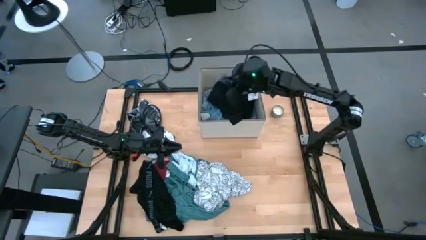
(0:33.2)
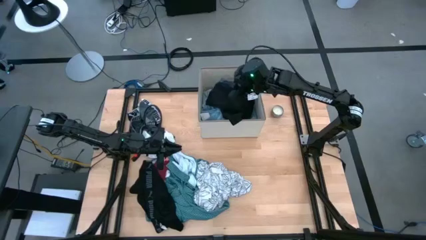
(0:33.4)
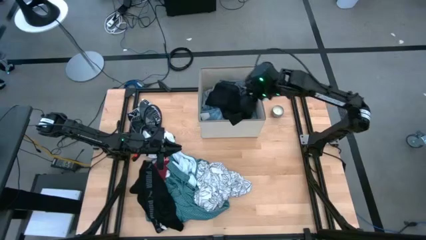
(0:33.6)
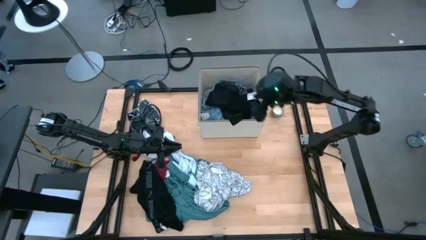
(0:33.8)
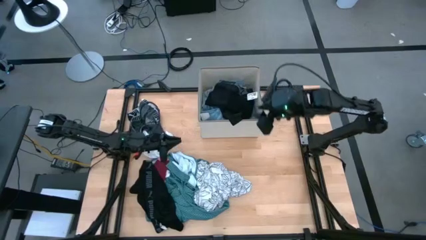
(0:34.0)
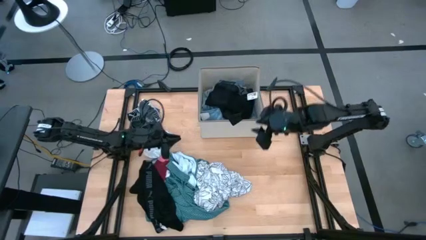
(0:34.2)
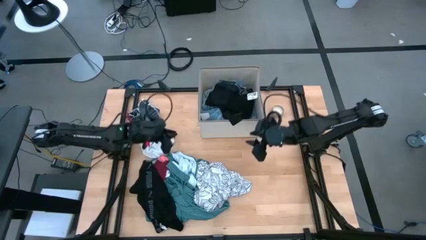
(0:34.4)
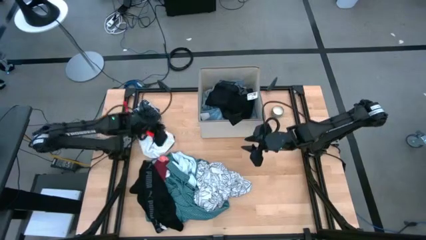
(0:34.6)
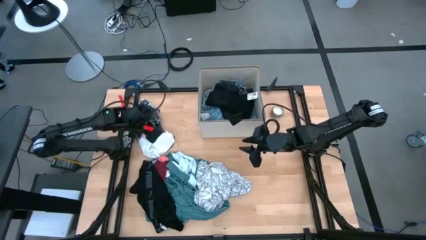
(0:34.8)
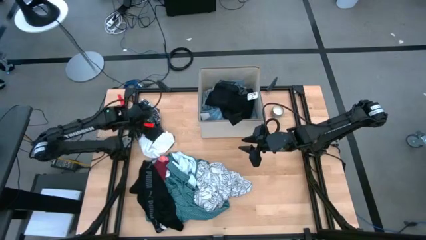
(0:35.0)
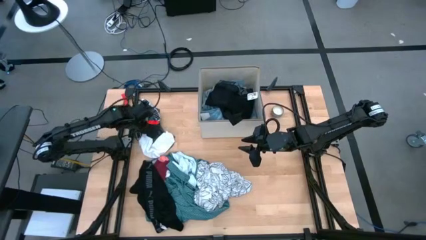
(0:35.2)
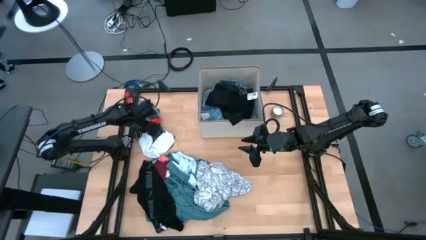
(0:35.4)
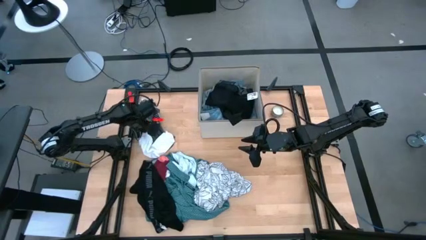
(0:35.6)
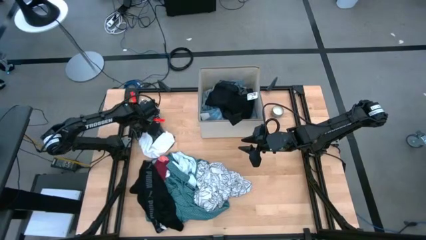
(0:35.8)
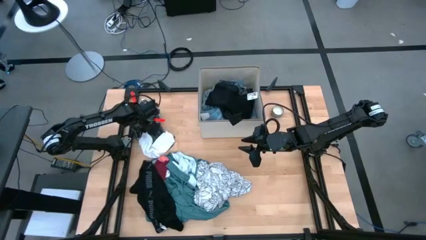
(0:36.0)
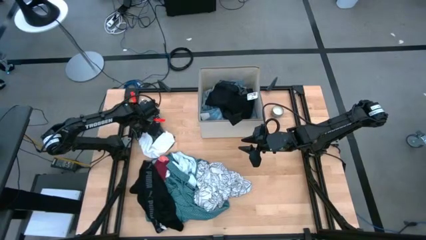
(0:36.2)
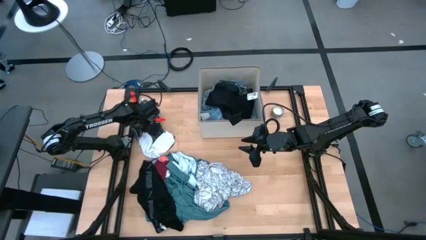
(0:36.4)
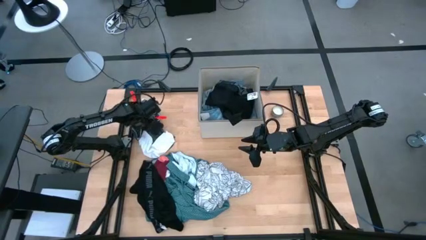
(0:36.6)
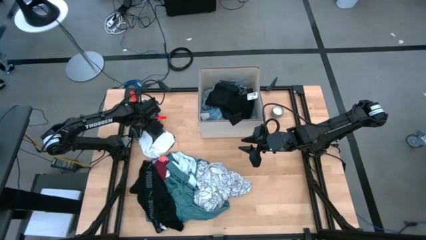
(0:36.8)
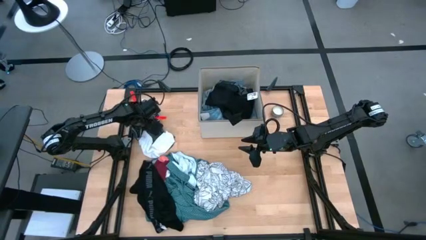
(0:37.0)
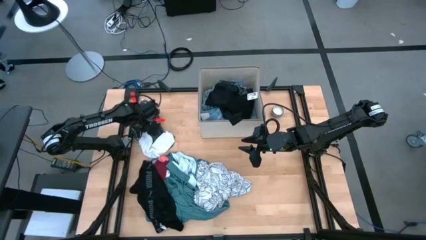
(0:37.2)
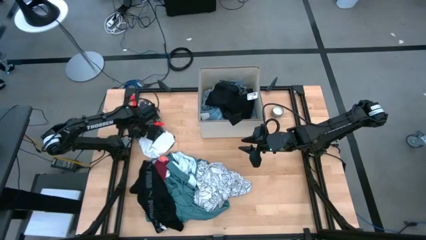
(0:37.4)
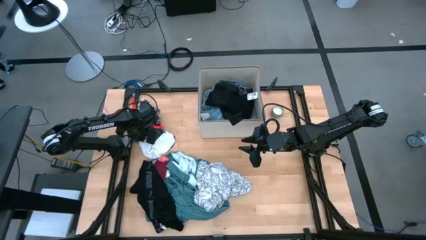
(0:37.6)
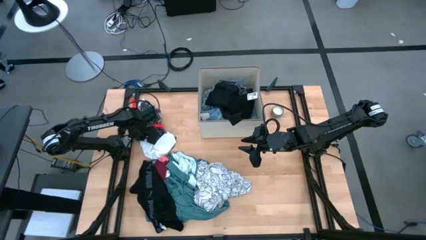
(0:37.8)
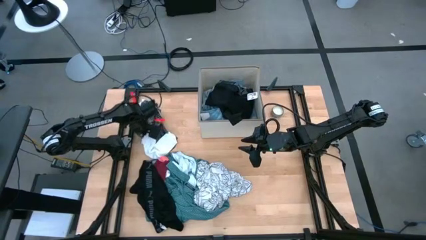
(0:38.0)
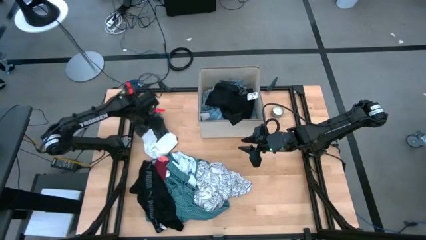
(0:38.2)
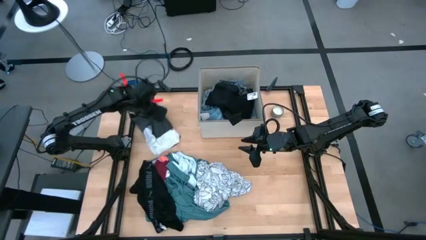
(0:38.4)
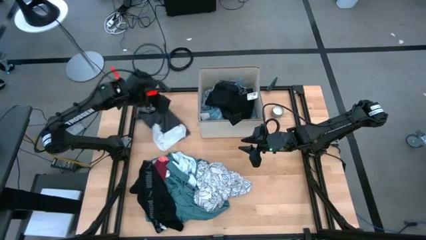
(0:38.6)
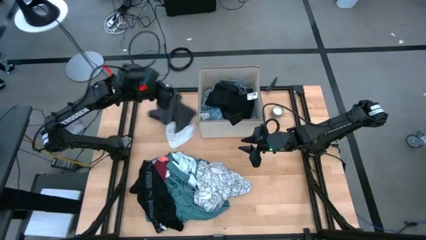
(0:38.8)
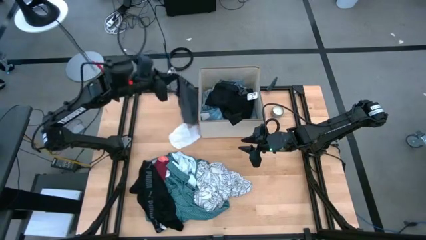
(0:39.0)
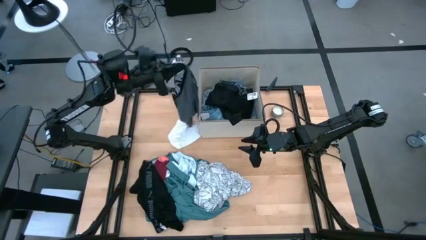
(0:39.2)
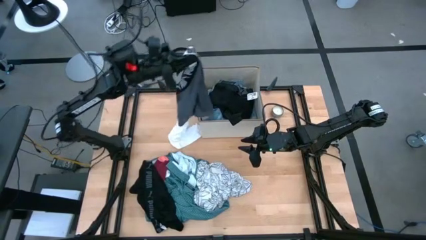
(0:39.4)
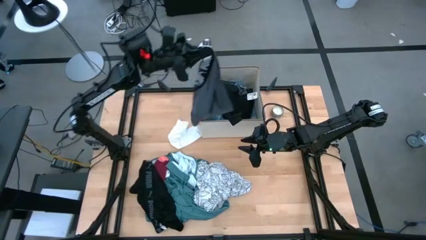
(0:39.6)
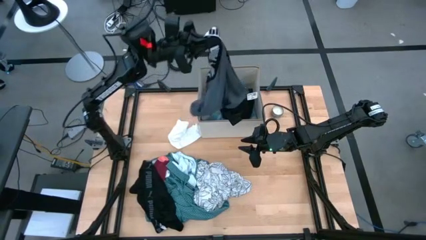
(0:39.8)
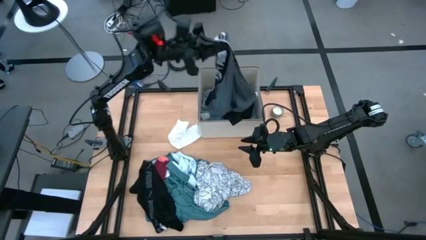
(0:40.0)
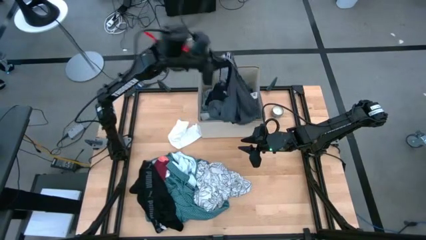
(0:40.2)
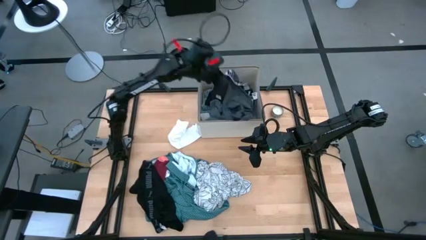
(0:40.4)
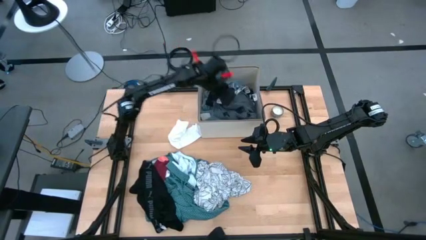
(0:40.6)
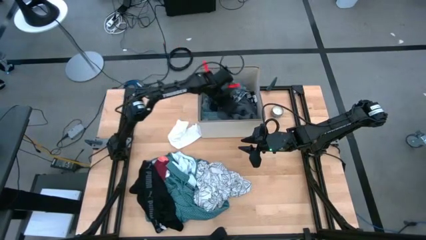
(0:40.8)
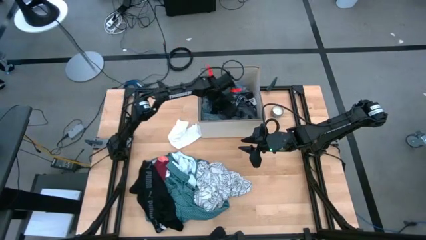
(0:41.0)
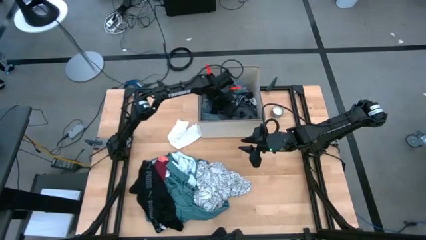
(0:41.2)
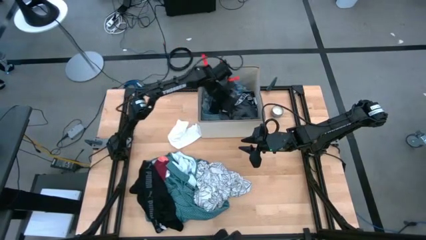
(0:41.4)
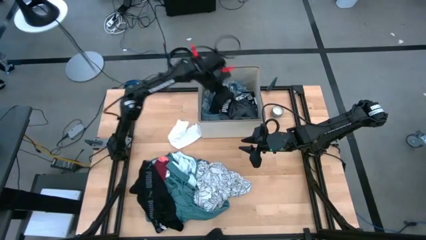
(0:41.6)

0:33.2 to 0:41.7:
Task: Sort clothes
Put the gray boxer into the bin

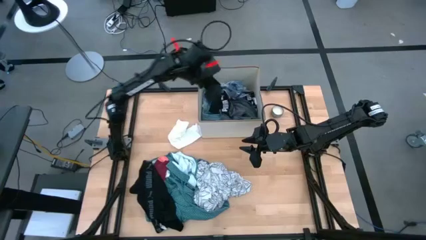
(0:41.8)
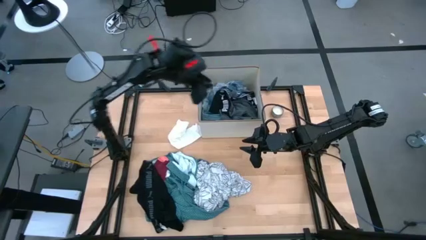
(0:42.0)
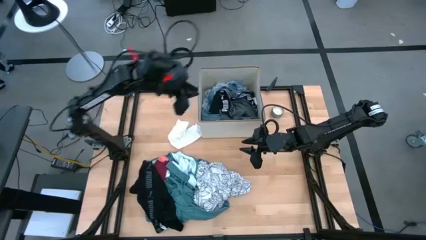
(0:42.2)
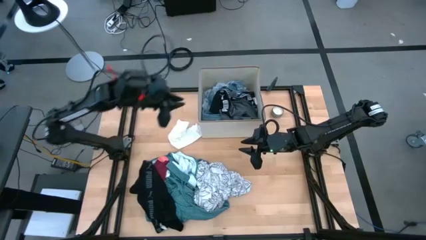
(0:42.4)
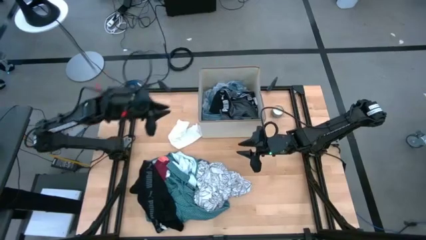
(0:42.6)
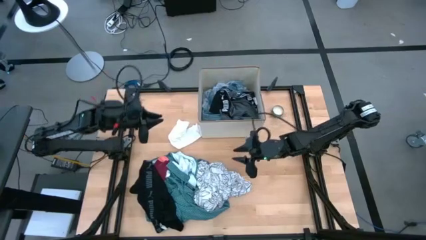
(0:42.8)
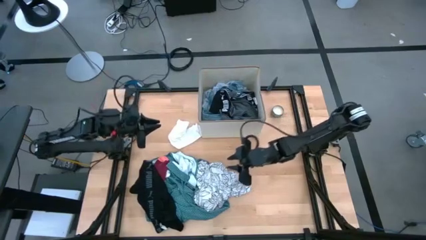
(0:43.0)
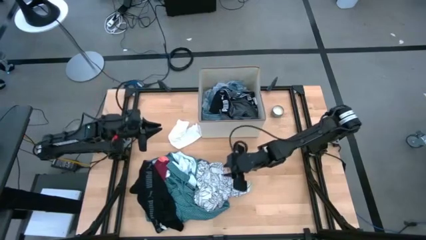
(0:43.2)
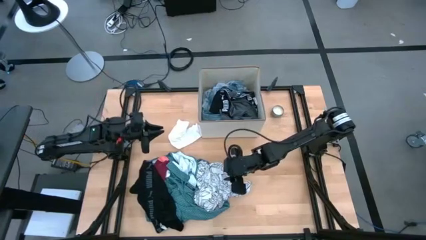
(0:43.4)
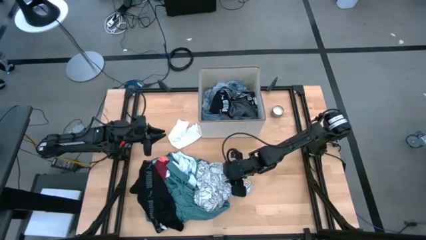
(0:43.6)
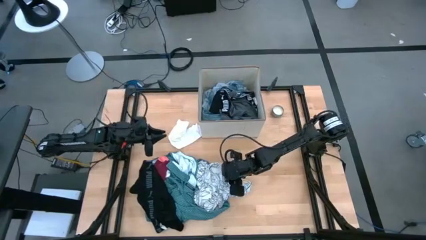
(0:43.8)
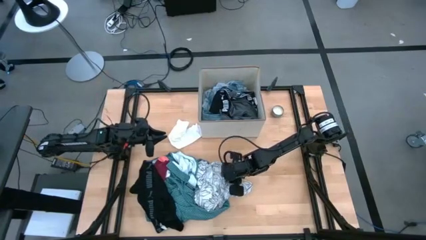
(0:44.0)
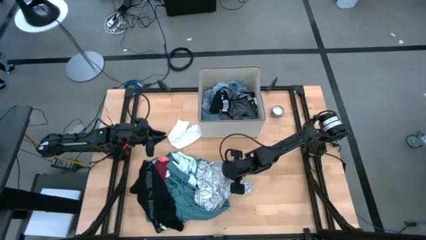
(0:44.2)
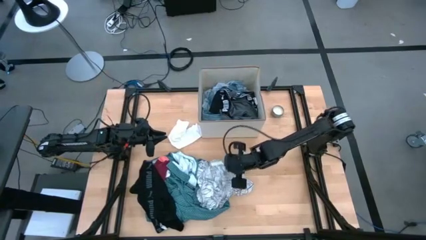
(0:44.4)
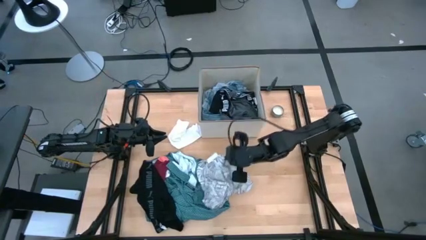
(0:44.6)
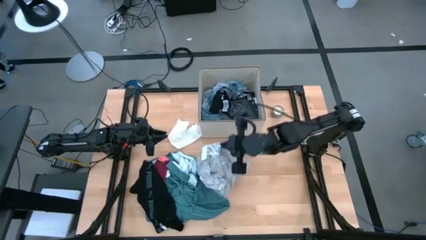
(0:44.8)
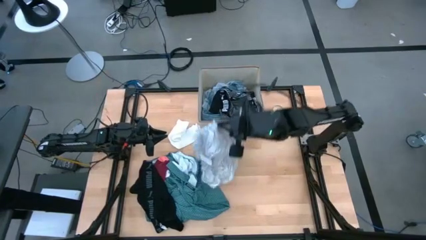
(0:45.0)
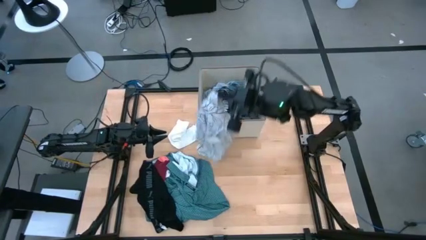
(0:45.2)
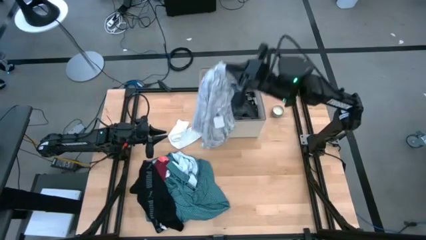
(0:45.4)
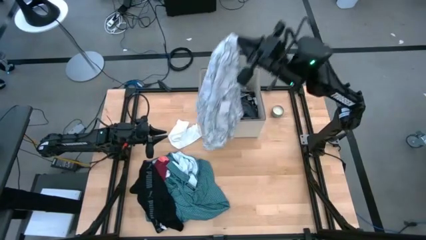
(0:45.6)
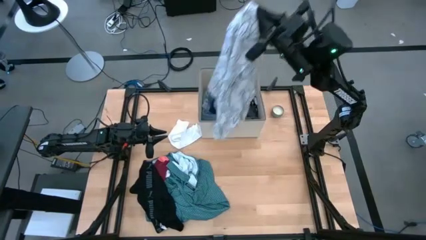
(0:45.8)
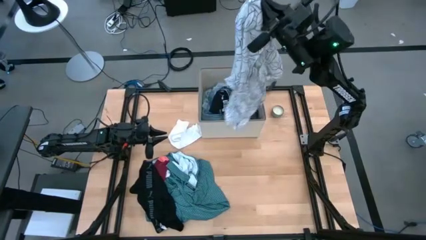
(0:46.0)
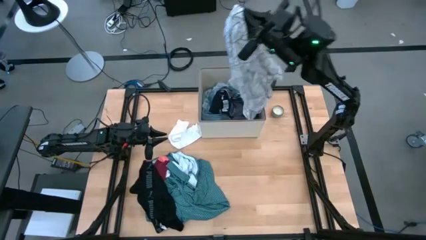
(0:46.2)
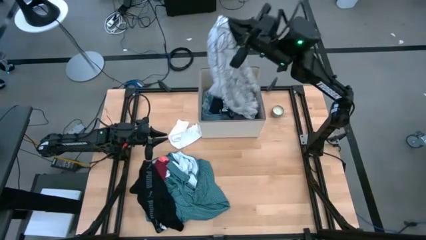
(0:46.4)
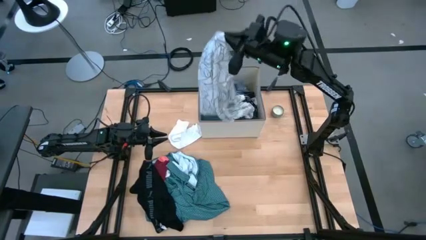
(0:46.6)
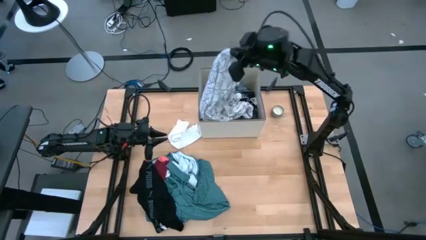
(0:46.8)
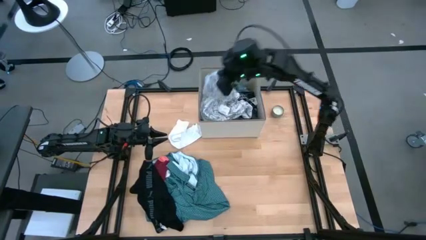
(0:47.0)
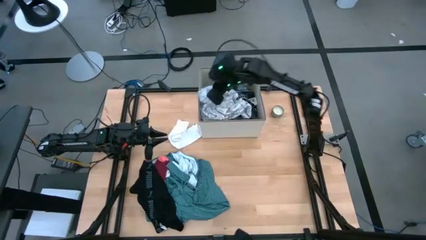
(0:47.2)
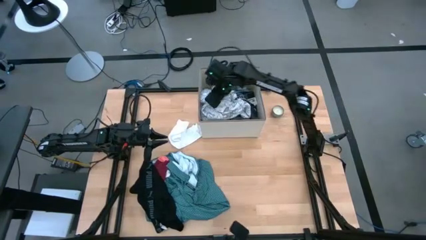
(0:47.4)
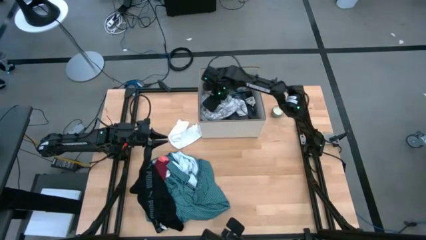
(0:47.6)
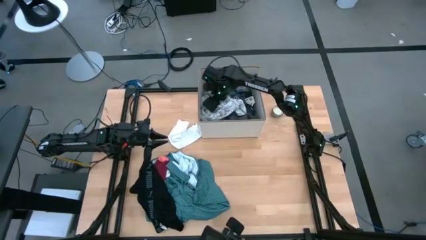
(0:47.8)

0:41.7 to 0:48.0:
Put the white patterned shirt into the bin

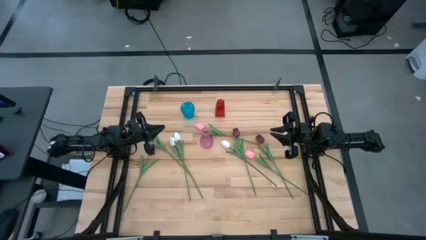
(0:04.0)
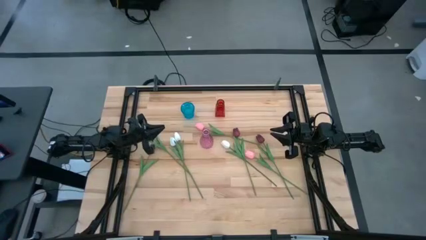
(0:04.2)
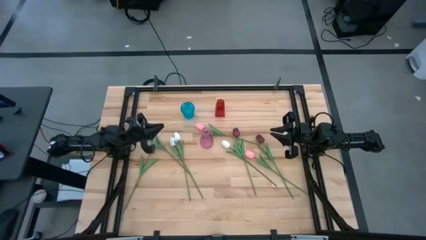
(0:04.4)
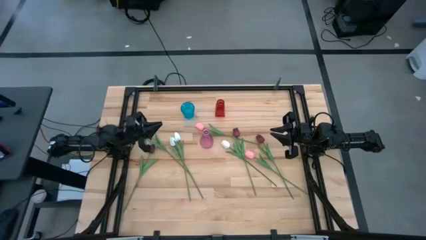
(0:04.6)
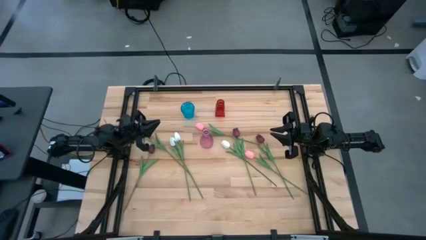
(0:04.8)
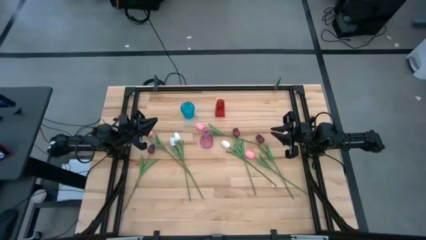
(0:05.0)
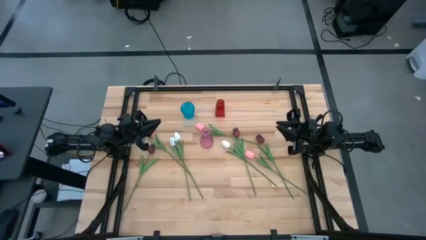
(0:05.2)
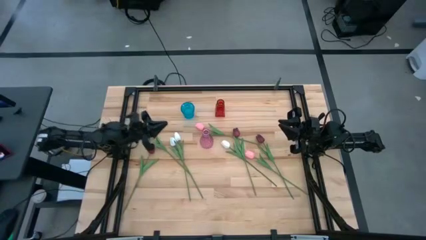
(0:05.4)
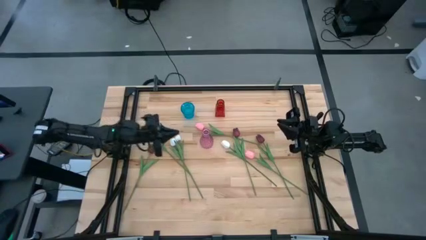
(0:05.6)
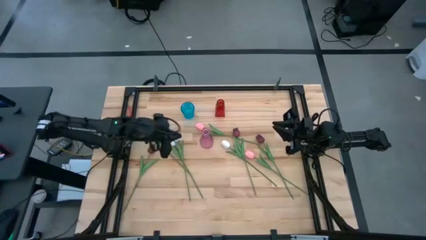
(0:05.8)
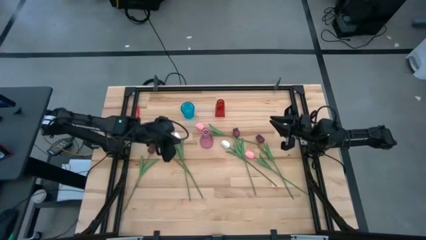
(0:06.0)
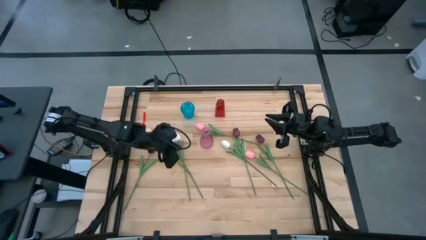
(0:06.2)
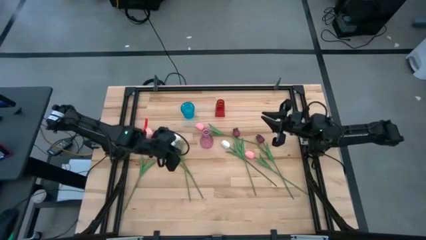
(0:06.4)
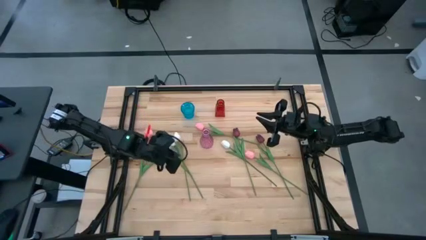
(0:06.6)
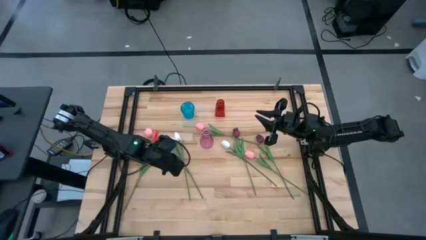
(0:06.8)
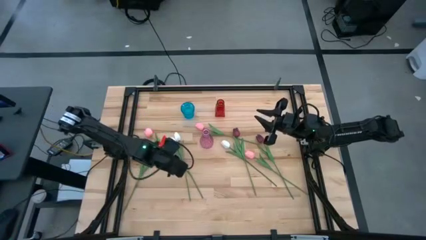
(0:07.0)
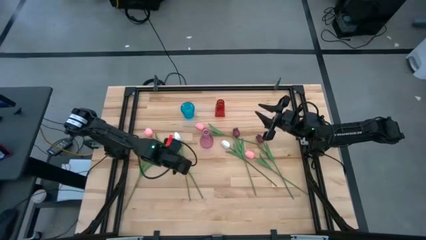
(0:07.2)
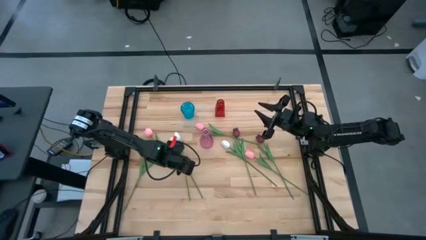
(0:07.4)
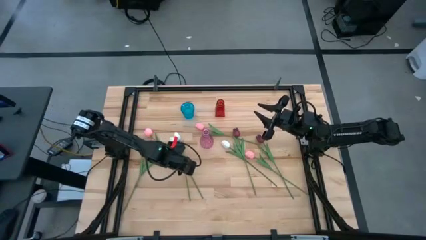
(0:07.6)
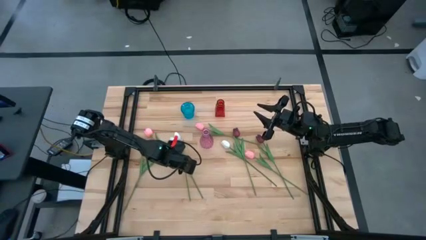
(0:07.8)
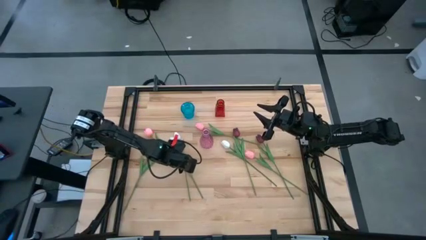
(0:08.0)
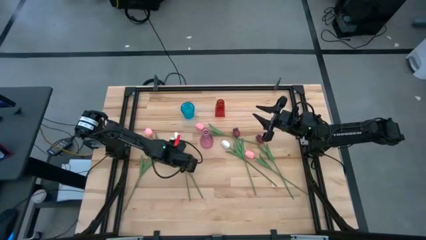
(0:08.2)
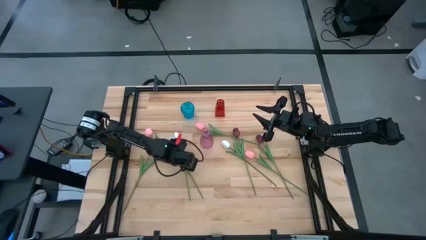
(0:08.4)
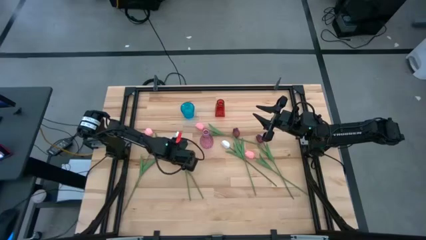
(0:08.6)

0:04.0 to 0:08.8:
Task: Sort flowers into vase by color
Put the middle white tulip into the purple vase
